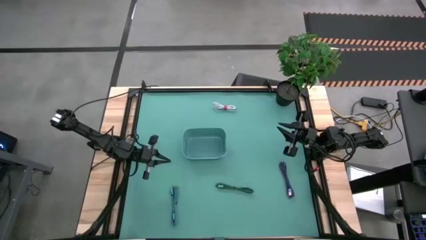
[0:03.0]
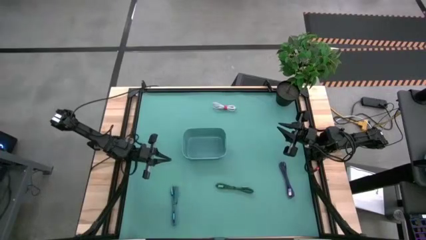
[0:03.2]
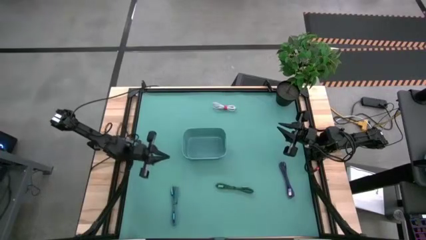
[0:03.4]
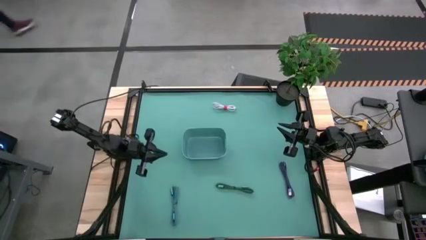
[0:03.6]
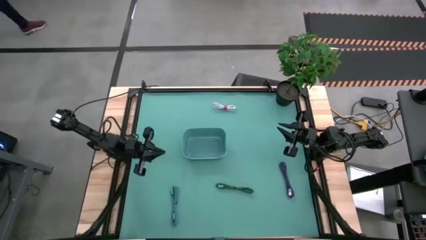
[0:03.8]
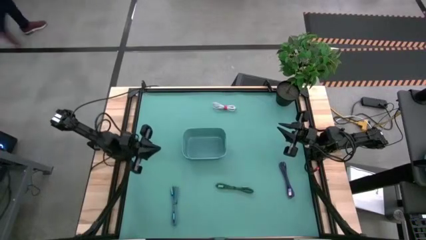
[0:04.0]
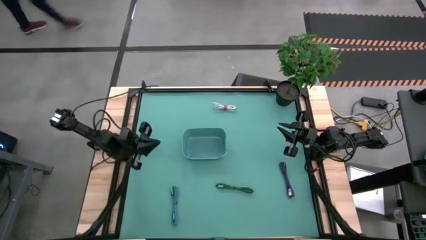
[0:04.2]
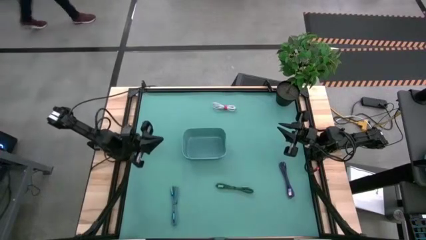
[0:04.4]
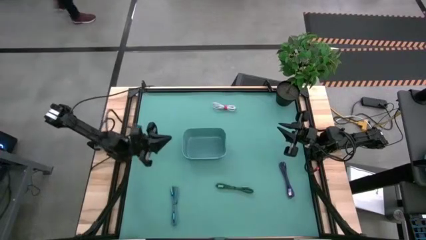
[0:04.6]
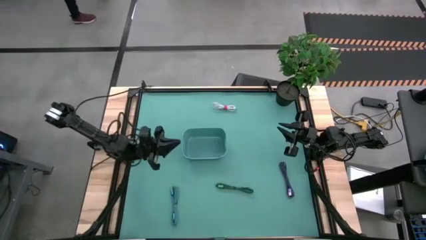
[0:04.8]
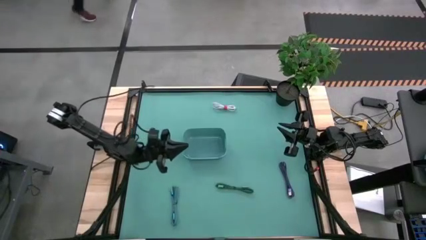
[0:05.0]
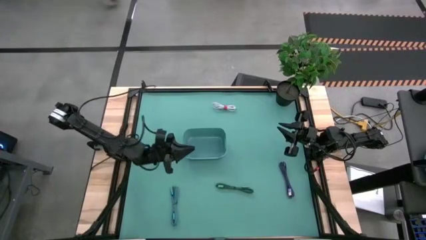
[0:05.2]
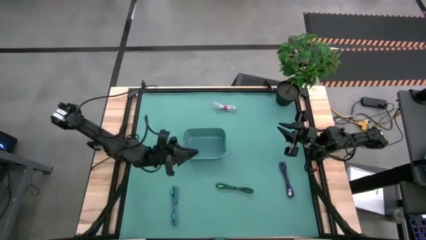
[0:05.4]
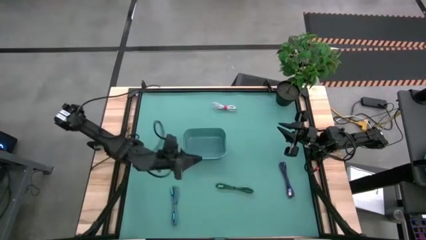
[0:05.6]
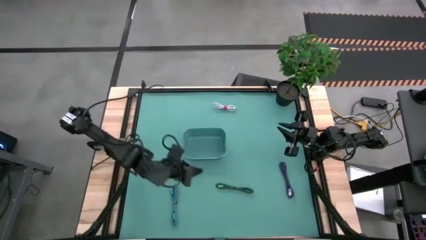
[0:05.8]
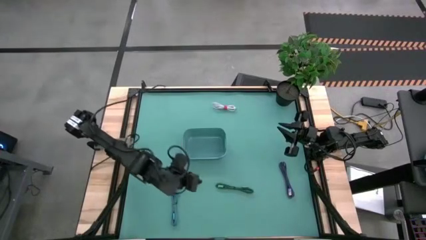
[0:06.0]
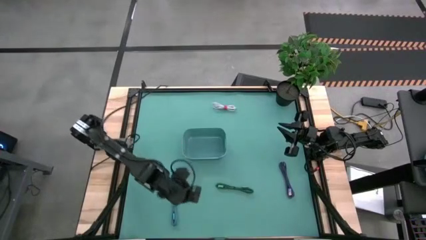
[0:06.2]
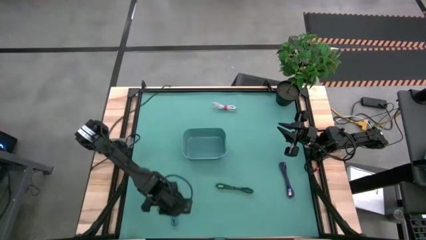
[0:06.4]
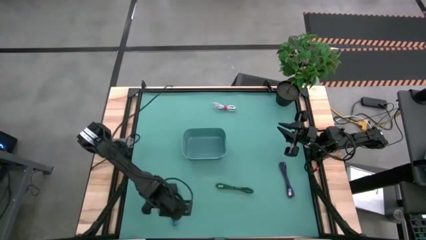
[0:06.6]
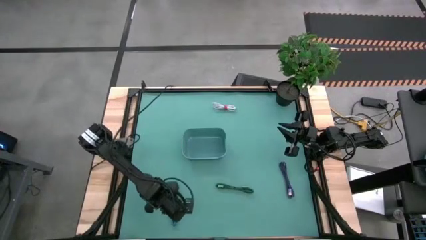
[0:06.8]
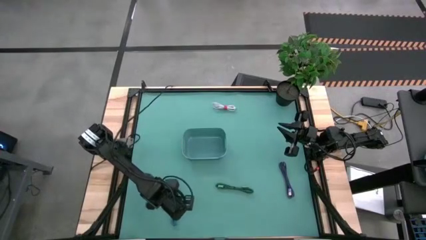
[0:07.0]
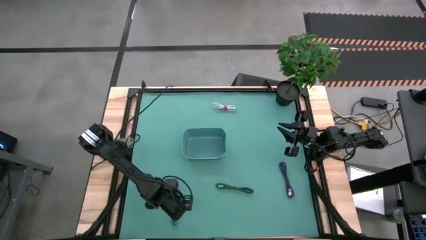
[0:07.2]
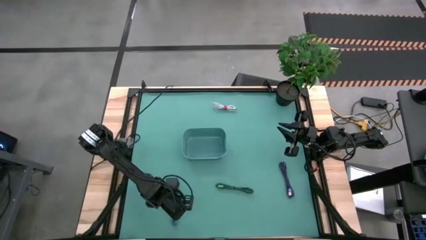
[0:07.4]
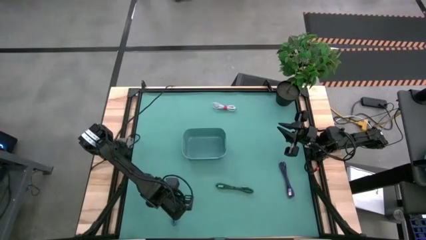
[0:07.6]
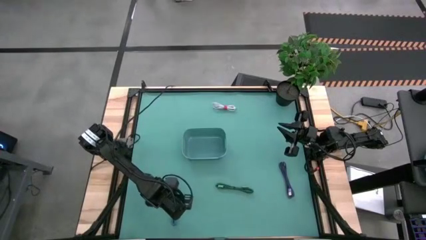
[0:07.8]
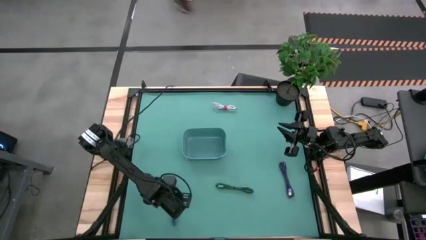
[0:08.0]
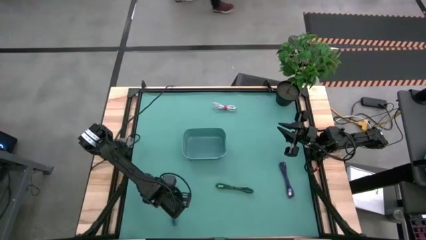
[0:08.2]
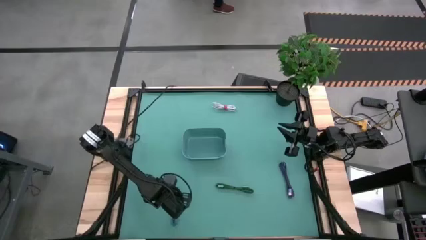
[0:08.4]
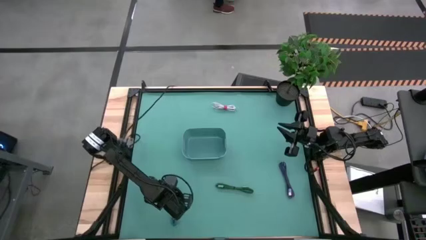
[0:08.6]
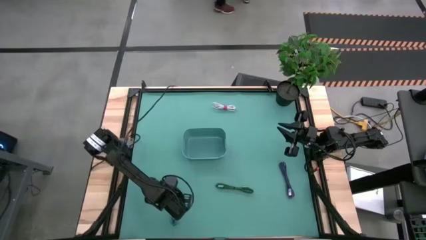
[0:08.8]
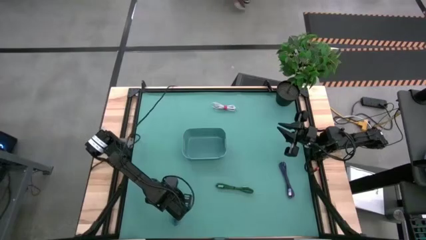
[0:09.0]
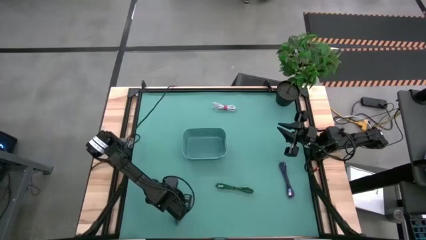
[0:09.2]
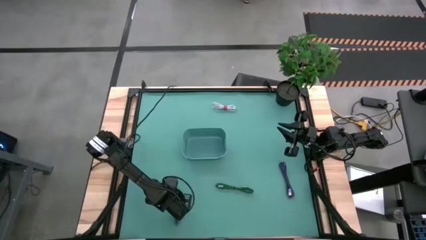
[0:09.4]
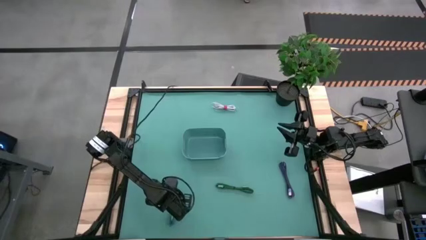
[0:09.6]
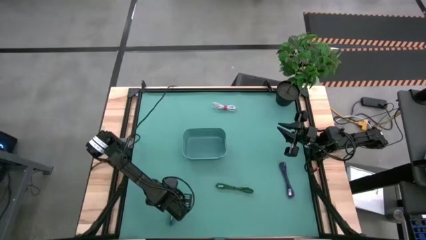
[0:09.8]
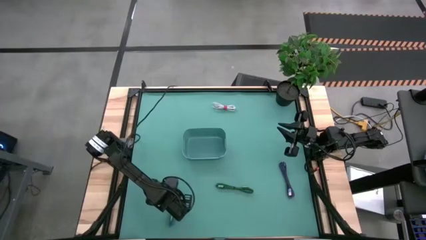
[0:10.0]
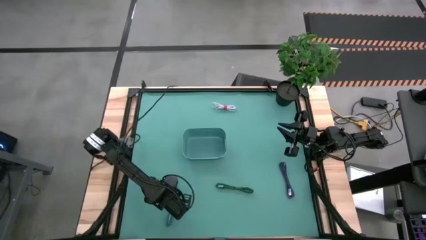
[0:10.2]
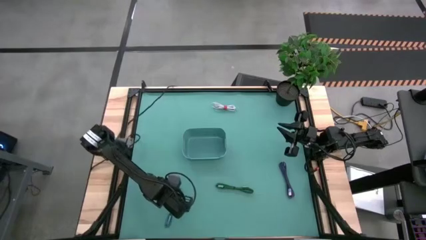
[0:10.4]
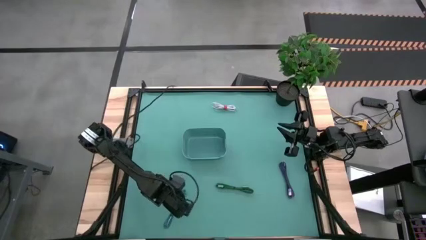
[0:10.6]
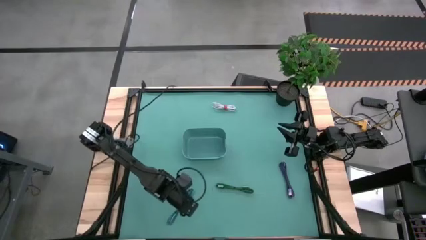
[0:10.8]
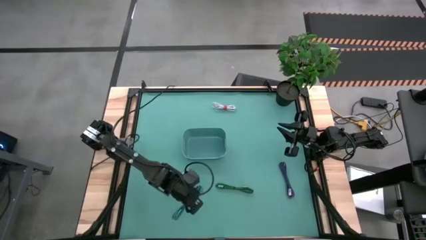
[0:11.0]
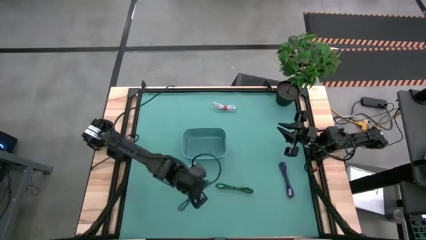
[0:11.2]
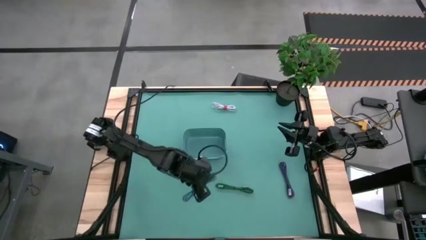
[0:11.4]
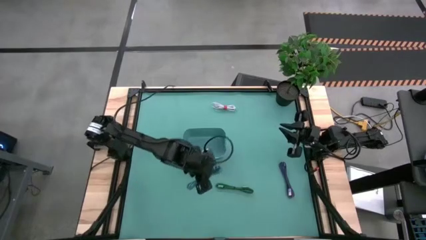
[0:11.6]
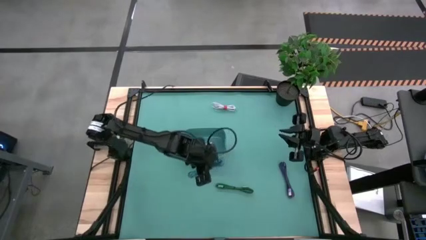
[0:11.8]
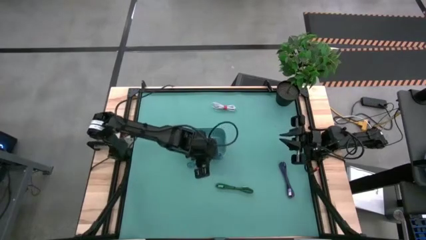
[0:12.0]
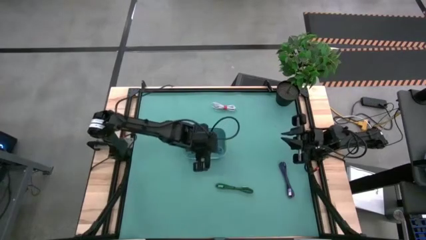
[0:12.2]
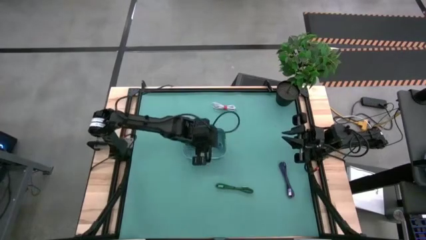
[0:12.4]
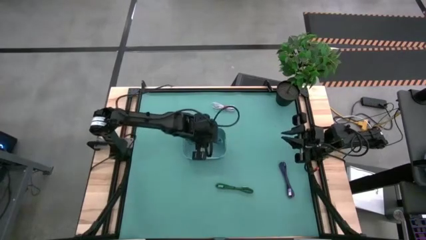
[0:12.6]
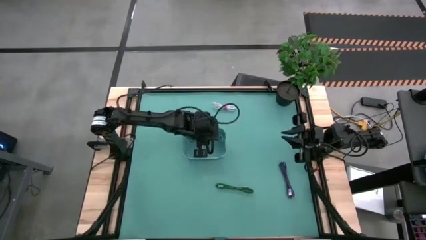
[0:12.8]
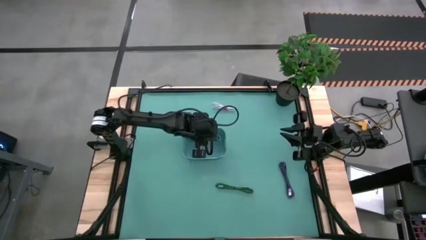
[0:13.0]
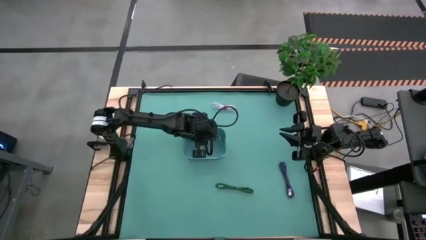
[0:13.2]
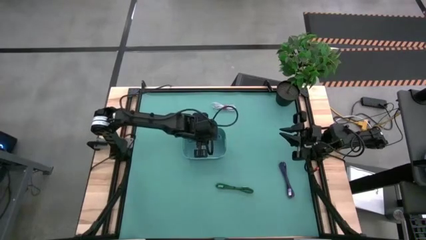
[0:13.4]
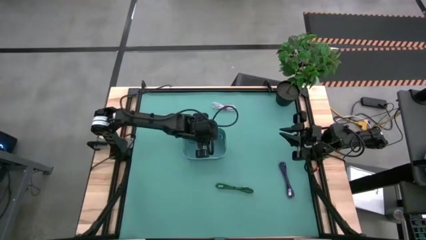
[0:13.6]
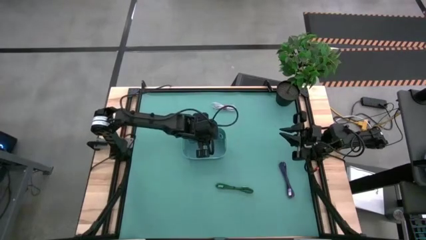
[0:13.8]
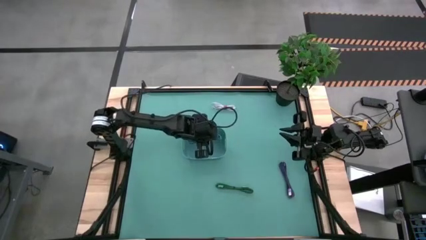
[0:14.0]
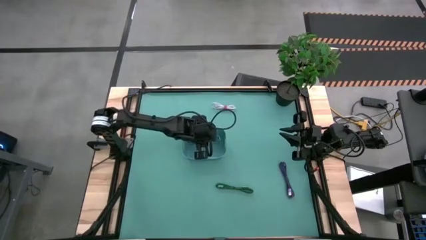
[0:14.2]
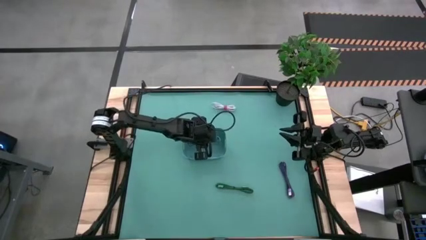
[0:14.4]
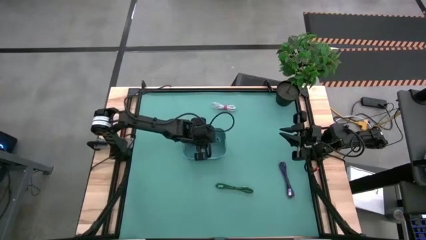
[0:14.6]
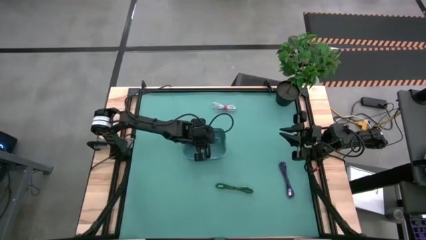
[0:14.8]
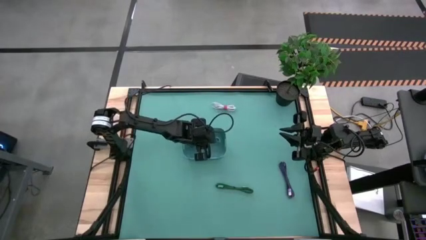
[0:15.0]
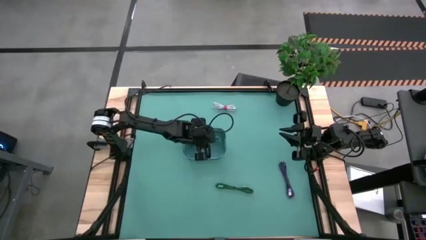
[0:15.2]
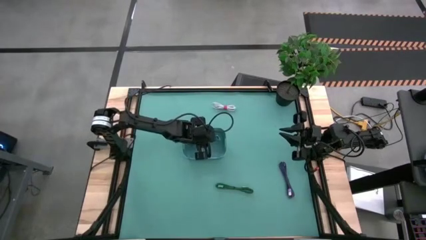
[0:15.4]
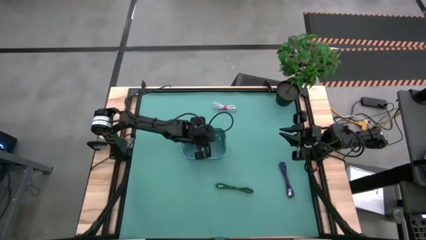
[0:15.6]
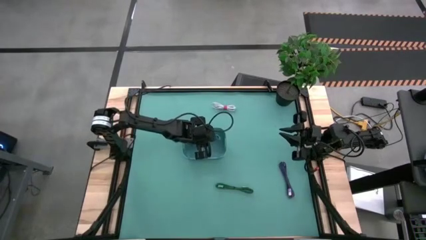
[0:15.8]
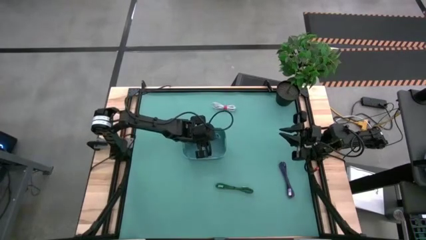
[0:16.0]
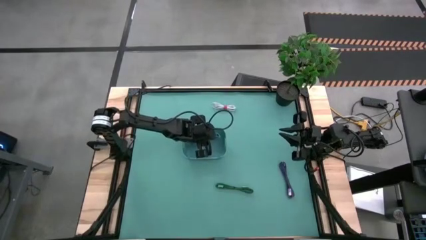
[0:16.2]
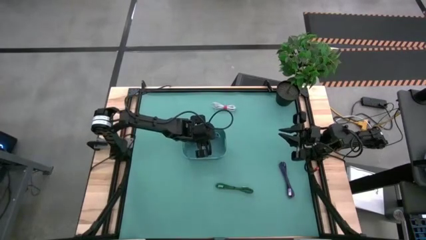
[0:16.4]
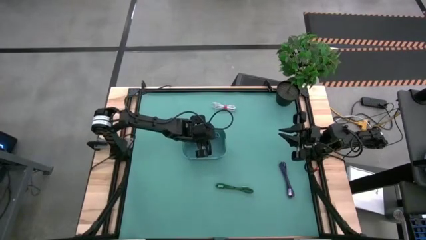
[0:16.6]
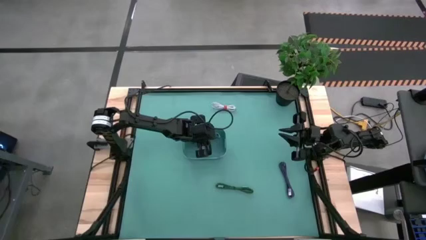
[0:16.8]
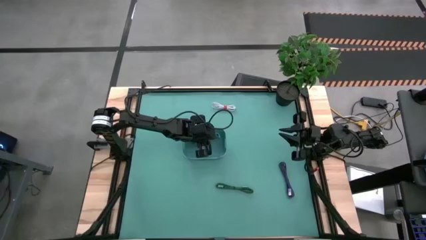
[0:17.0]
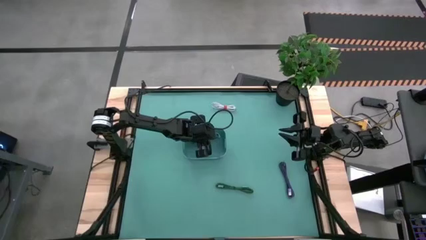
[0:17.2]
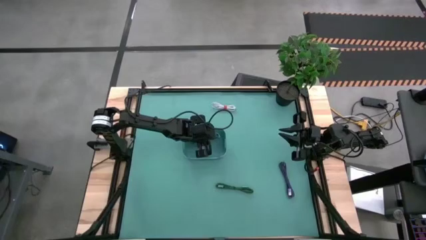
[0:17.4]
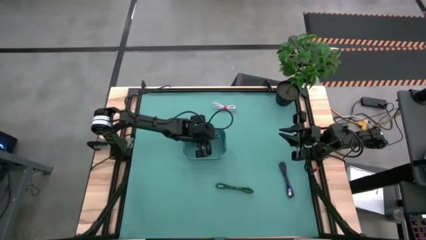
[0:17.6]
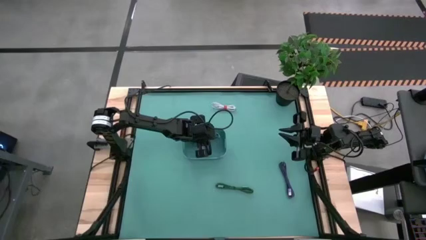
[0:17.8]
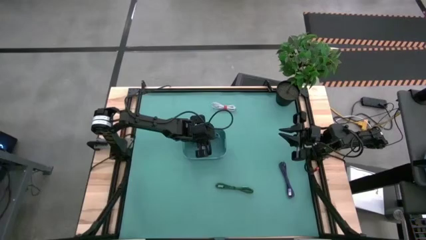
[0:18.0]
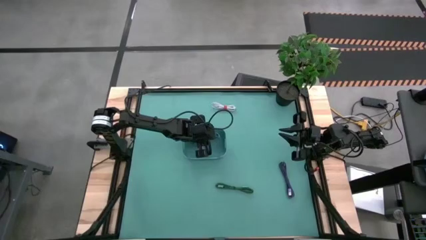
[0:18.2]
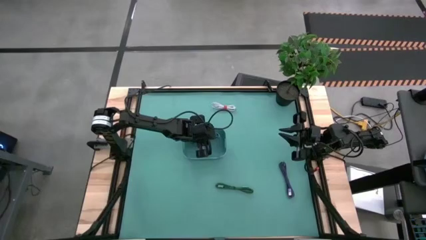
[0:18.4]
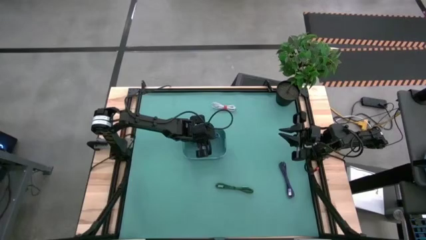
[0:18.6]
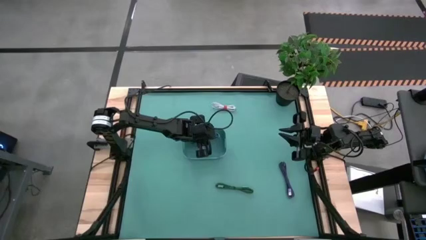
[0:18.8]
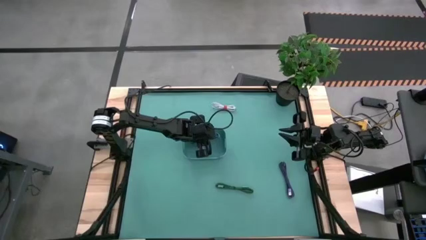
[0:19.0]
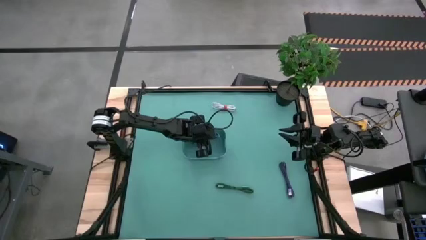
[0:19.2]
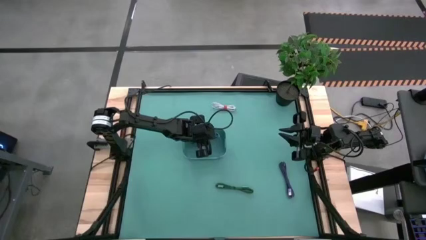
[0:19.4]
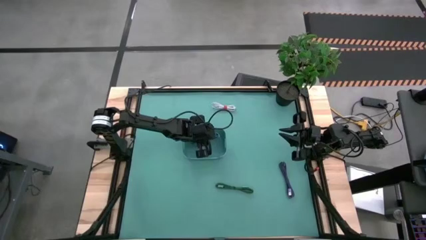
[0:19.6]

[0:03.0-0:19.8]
Task: Pick and place USB-C Cables
Put the blue black charger cable into the green bin
